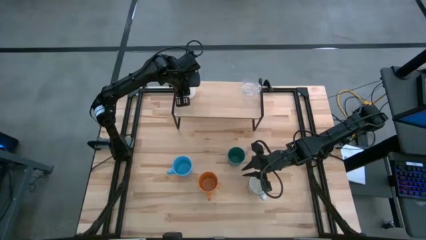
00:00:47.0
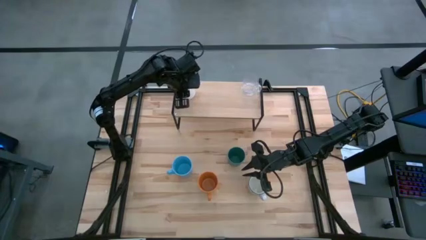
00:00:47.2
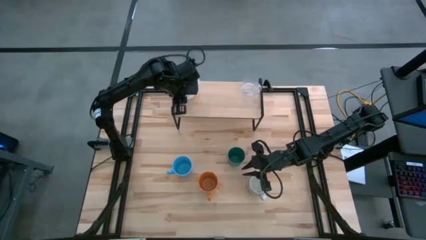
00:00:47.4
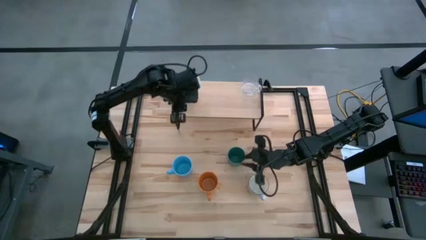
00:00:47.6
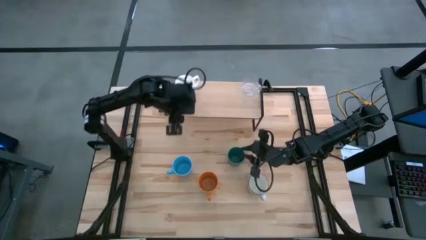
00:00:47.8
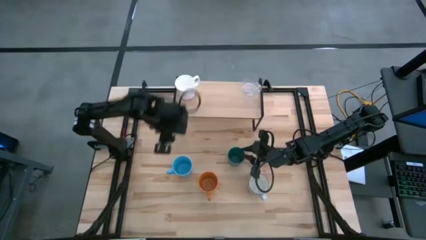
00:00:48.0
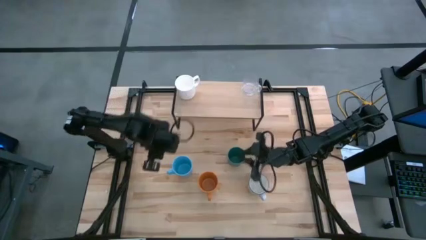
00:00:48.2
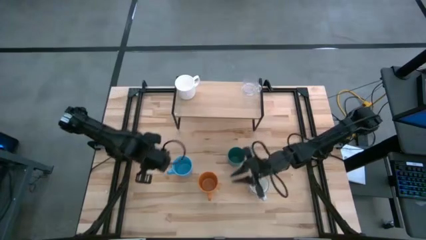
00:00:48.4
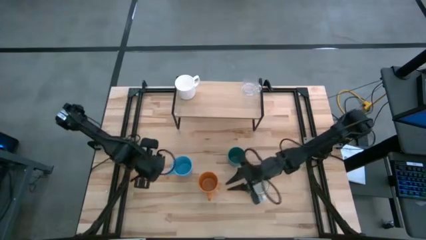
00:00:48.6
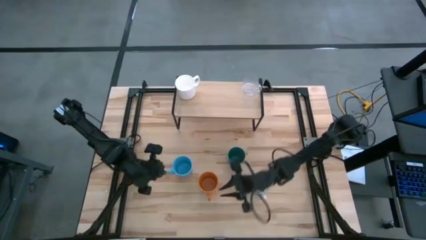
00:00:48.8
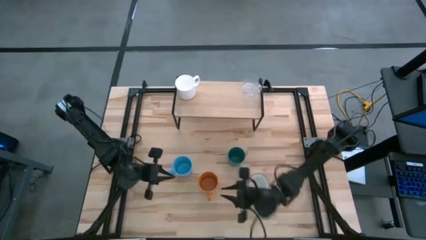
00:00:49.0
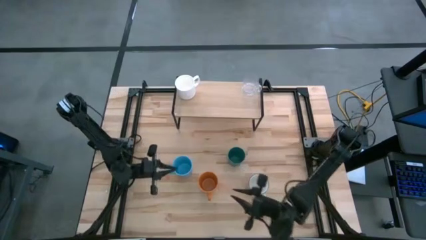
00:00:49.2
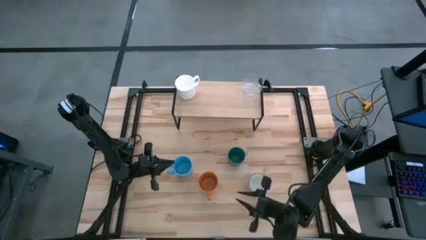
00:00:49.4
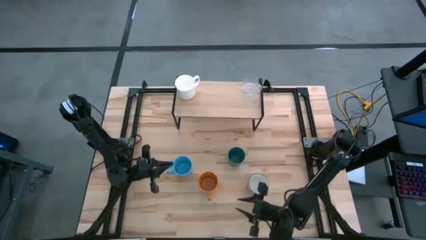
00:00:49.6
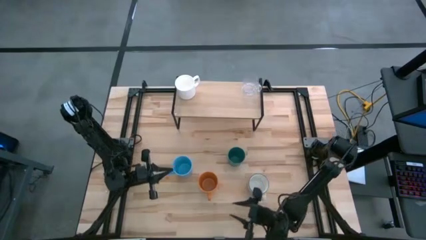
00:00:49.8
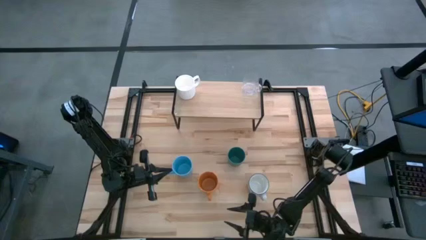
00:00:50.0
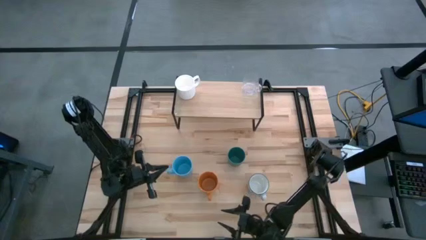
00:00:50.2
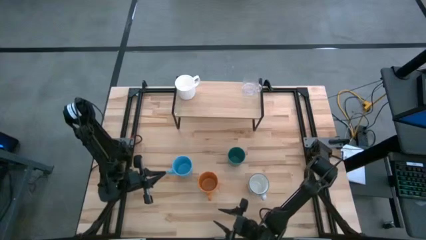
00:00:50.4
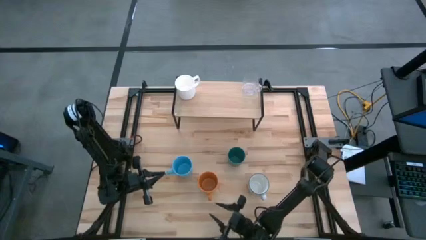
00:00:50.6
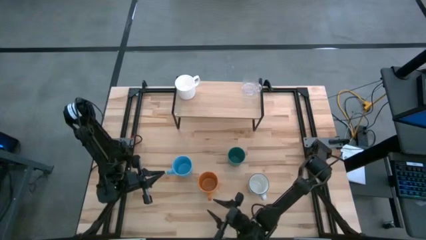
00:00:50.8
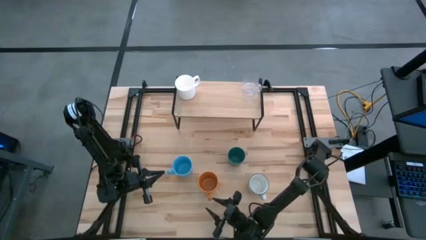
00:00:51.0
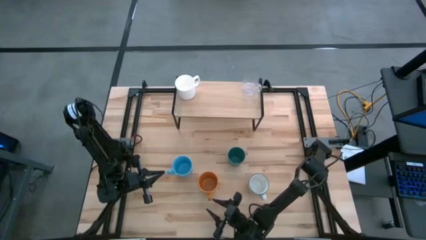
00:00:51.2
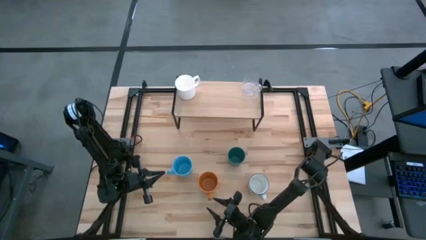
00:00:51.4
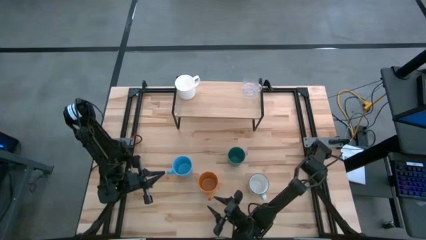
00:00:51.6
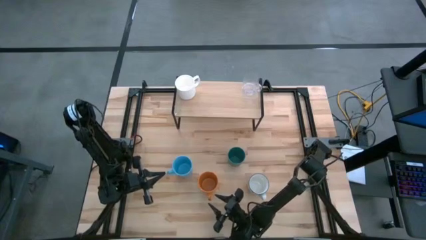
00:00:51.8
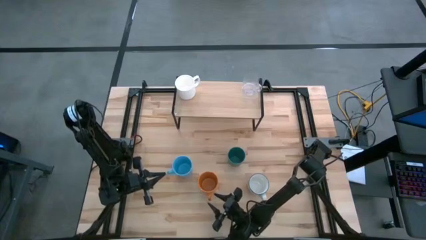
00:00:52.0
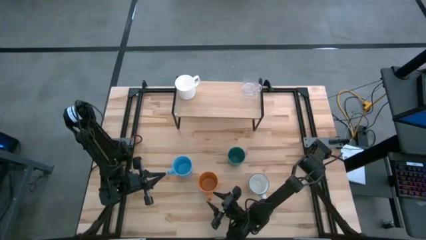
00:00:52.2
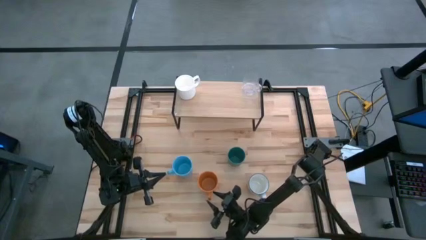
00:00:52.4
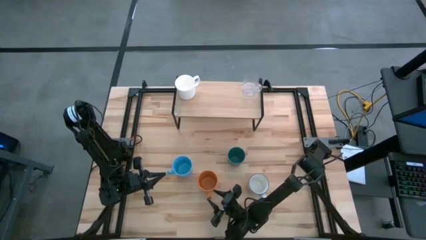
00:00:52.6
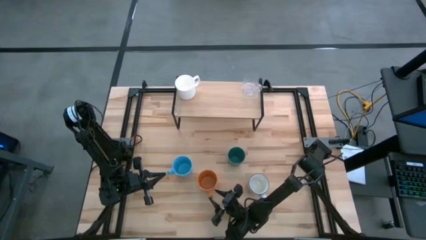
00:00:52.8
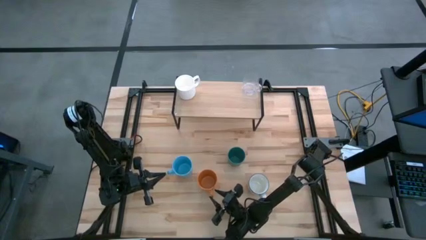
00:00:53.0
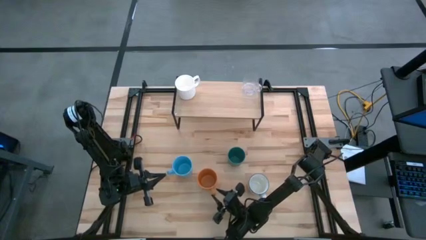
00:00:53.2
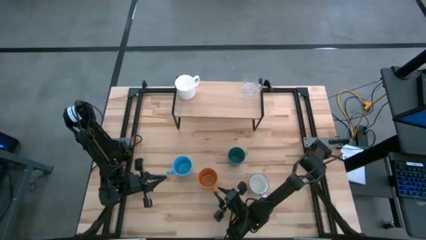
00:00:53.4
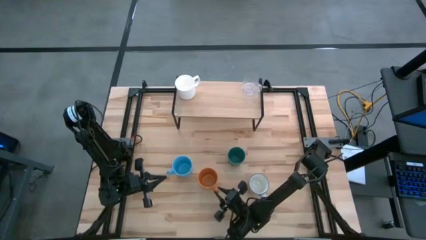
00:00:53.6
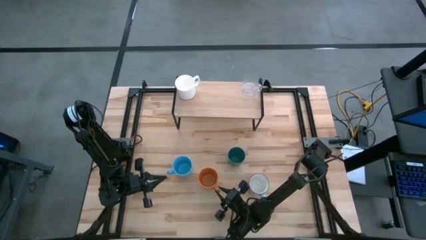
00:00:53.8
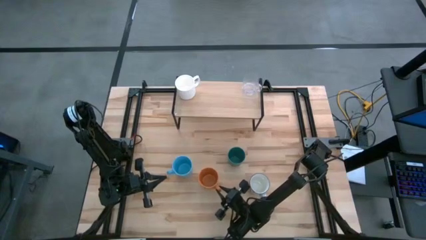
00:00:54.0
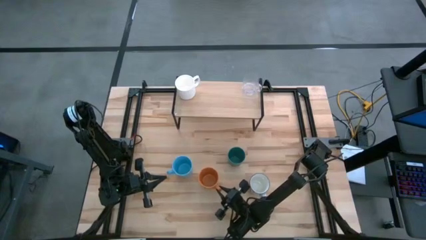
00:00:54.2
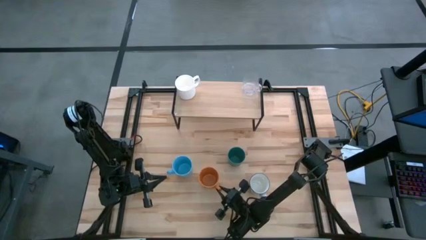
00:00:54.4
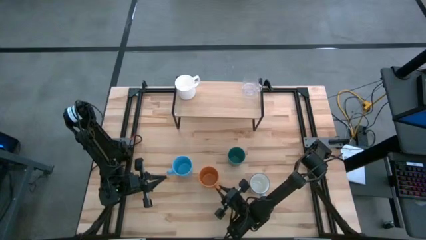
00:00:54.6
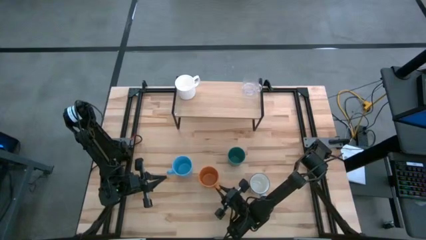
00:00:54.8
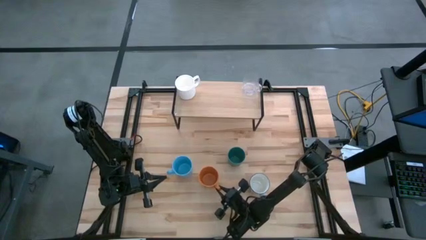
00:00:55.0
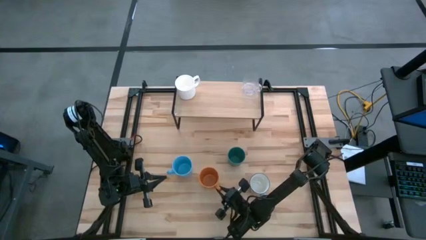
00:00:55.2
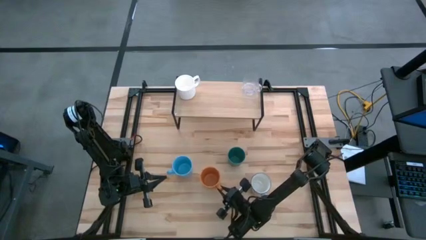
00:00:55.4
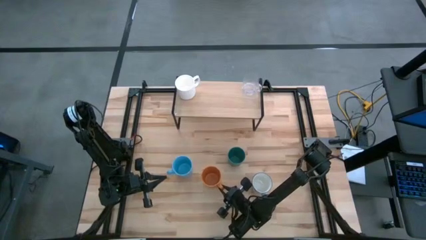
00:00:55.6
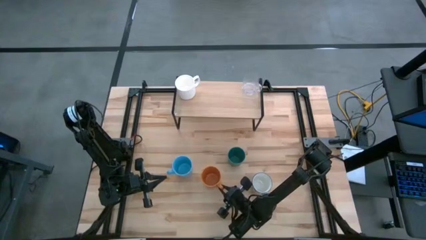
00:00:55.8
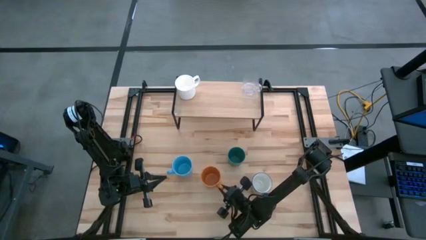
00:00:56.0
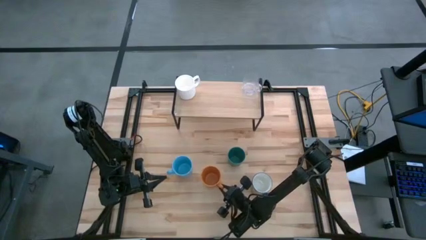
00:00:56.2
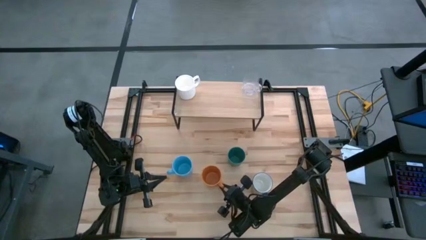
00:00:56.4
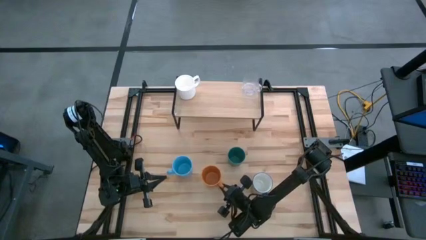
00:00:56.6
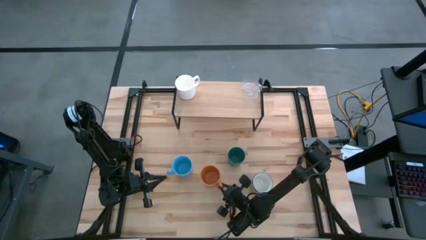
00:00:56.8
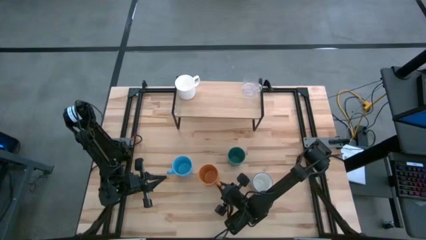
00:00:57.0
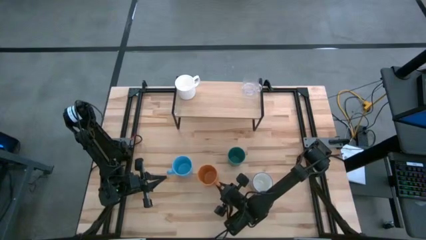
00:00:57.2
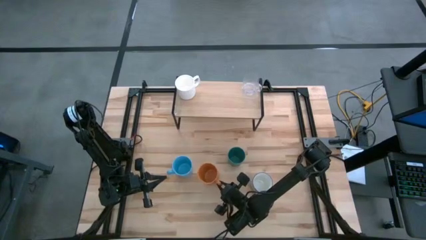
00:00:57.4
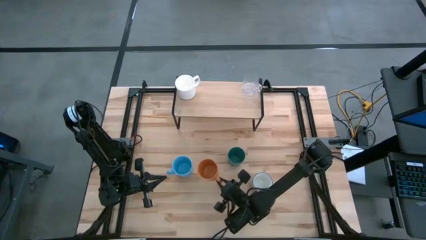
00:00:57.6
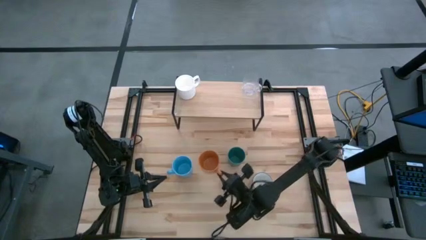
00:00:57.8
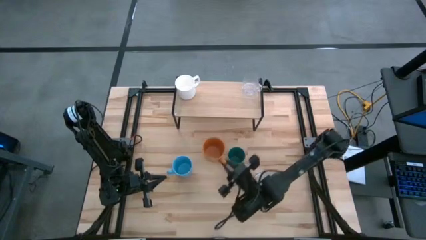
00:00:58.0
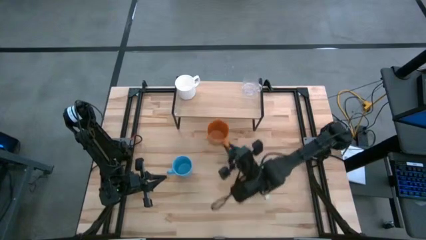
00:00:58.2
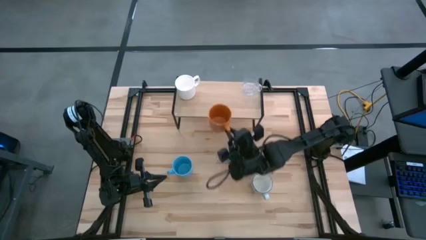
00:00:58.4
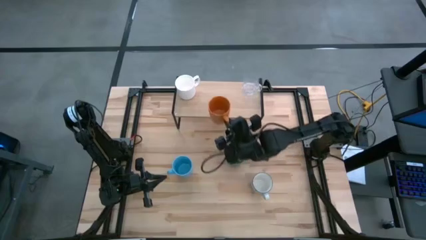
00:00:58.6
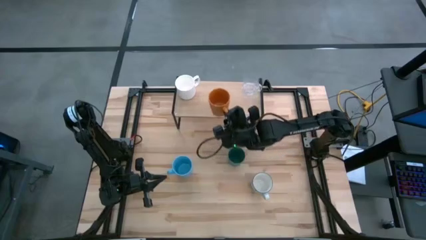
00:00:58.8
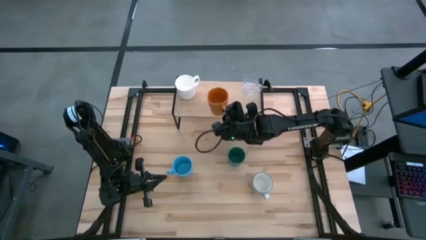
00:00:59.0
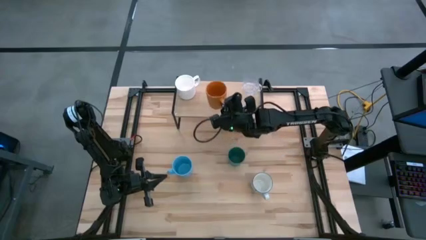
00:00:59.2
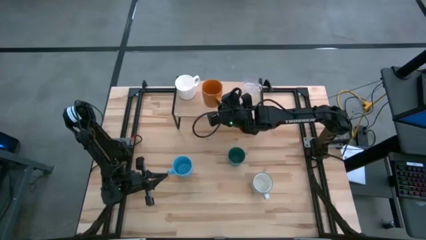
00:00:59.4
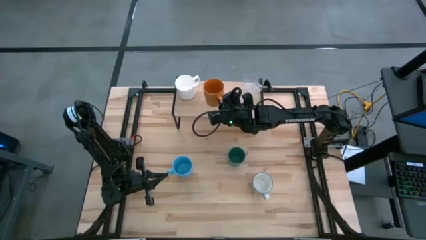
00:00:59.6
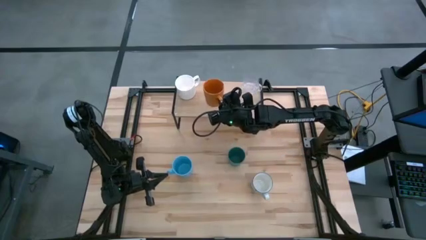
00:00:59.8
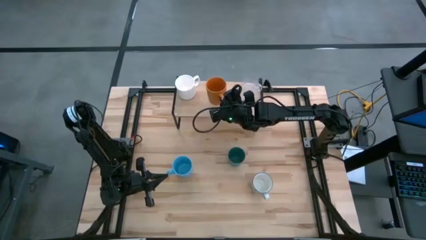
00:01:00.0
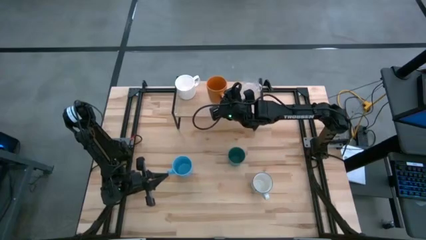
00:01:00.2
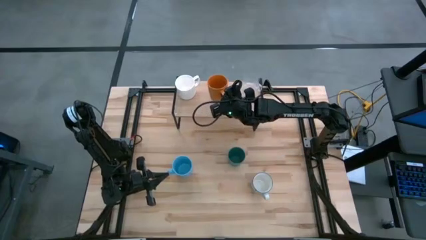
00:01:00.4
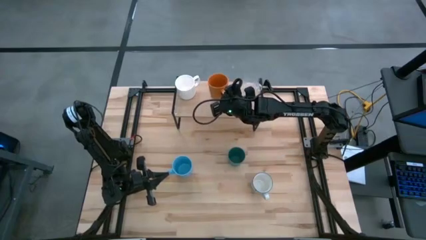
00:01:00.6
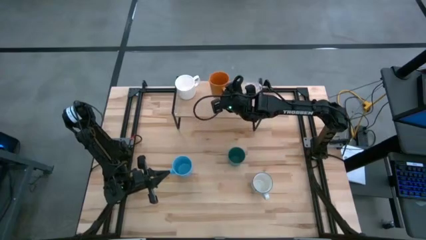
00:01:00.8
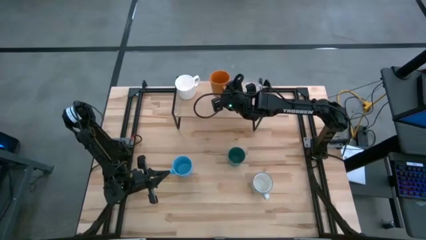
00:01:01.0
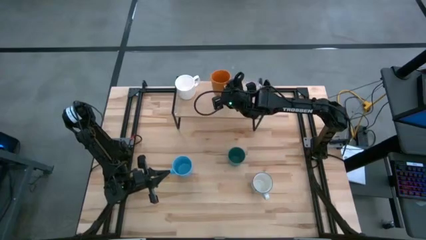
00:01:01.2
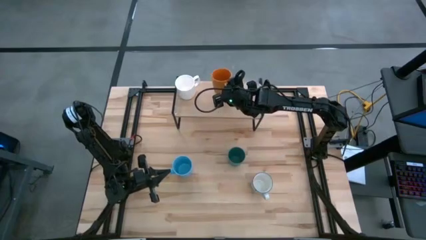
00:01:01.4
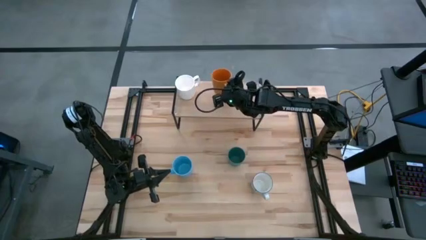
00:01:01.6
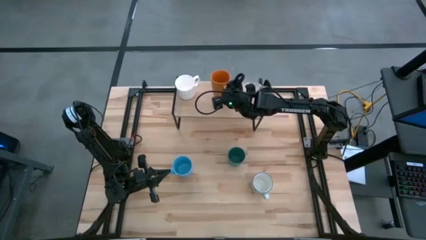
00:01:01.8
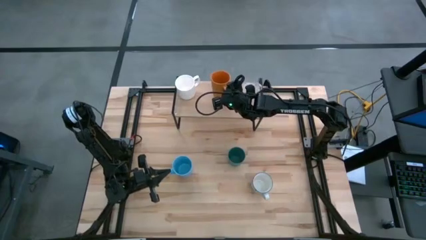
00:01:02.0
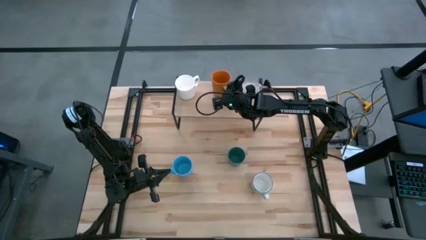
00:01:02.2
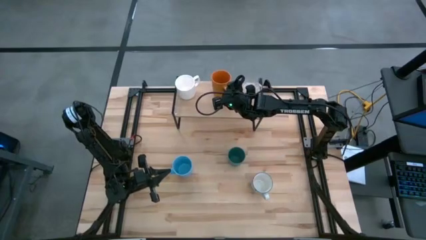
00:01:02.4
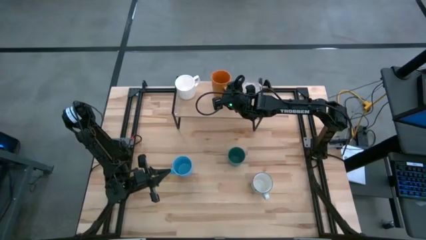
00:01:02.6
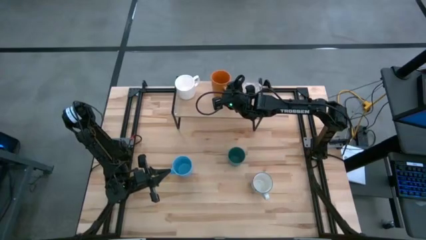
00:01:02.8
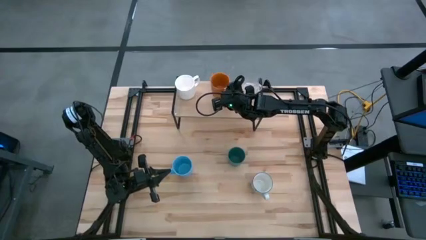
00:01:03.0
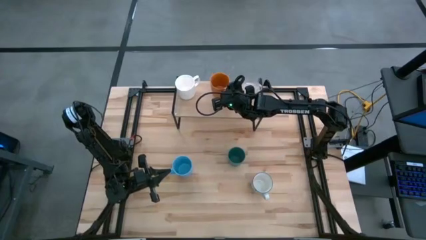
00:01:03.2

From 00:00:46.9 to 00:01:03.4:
Task: Stack small to large cups/mugs on shelf
Put the orange cup on the shelf
